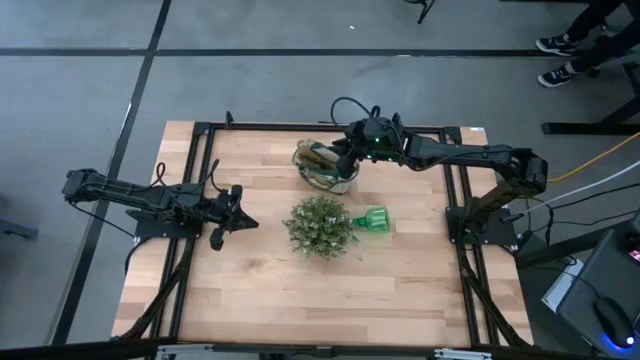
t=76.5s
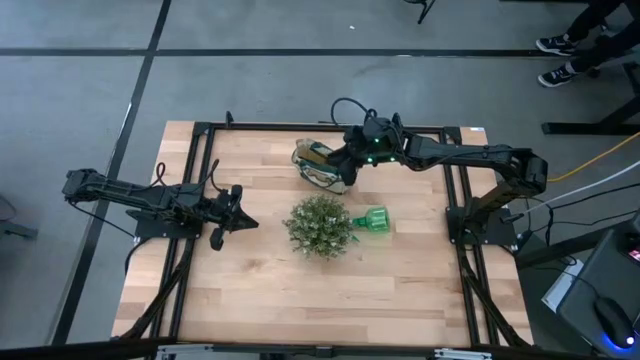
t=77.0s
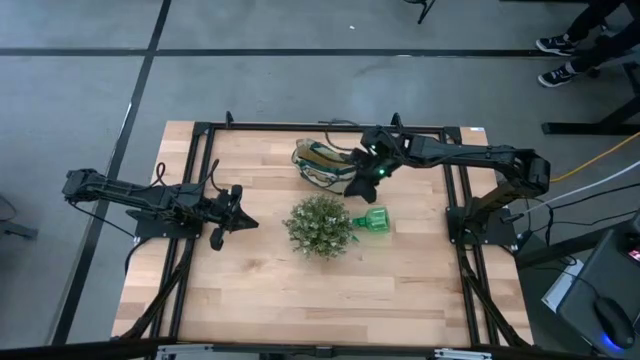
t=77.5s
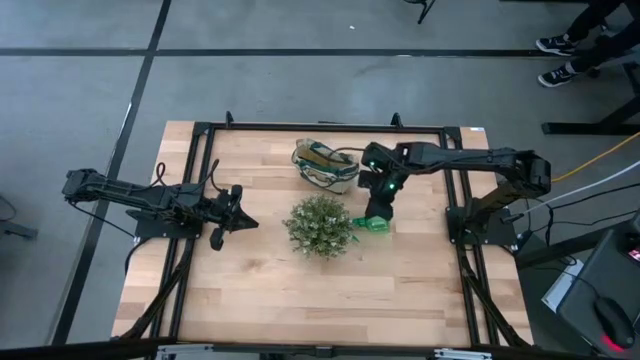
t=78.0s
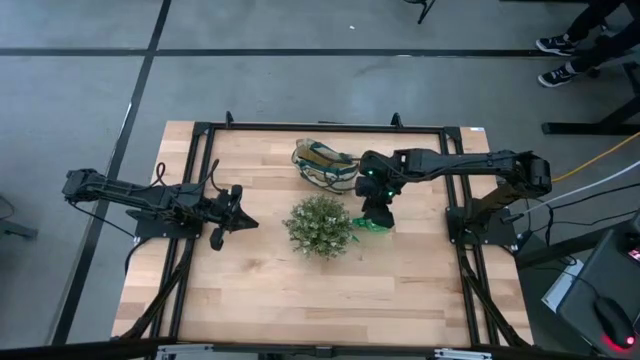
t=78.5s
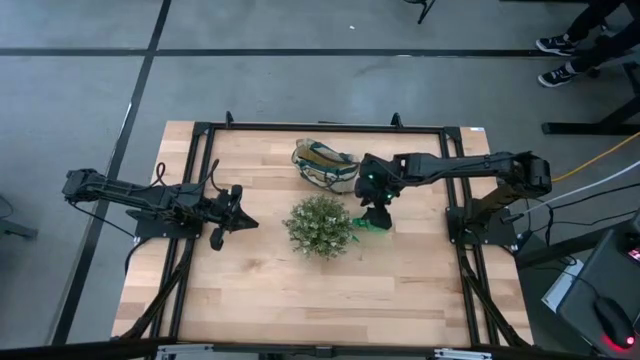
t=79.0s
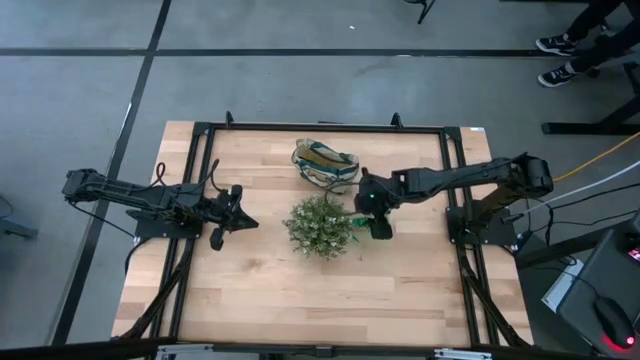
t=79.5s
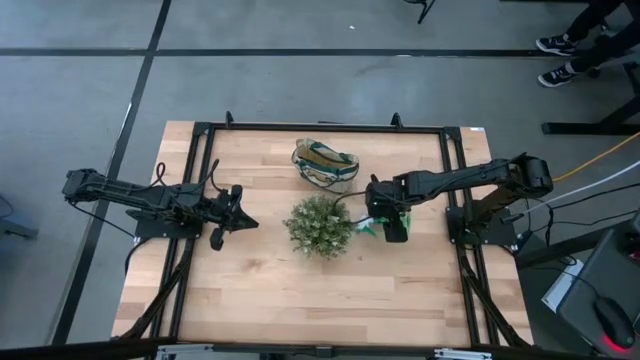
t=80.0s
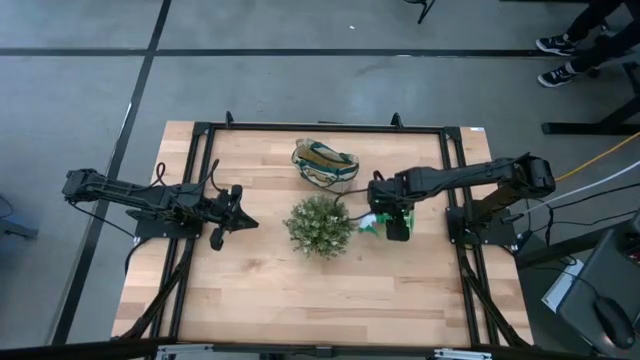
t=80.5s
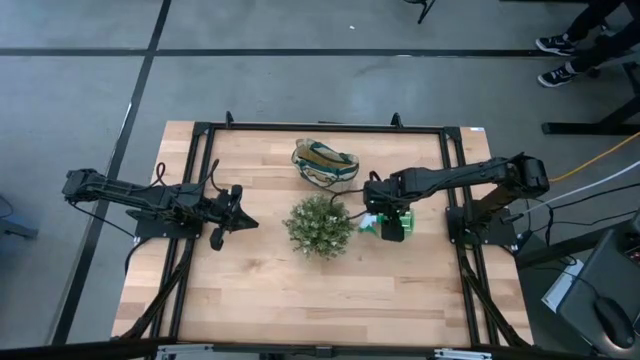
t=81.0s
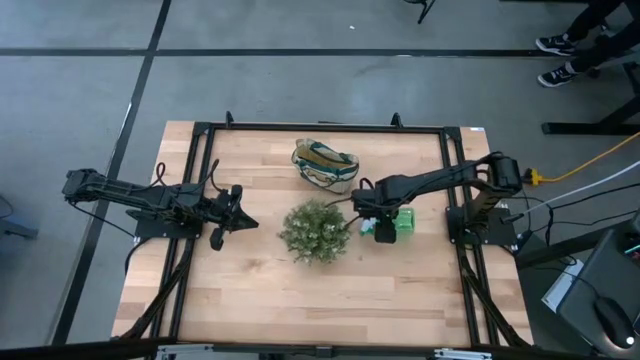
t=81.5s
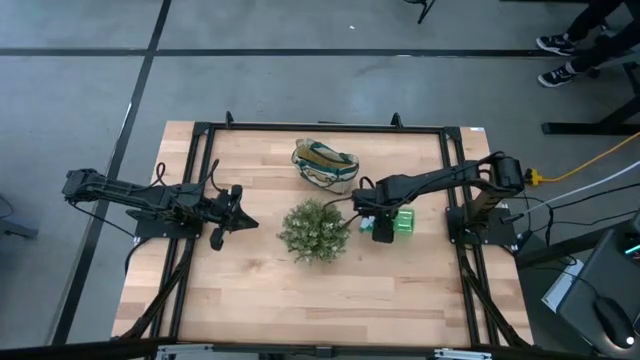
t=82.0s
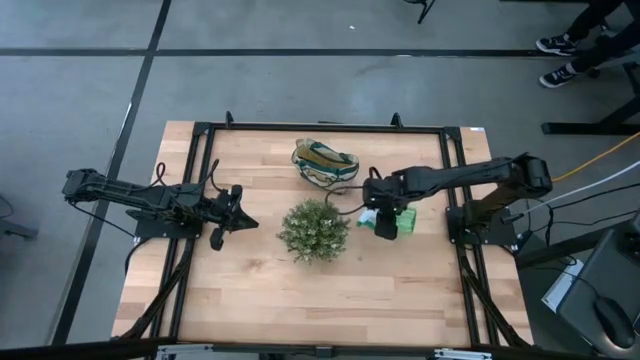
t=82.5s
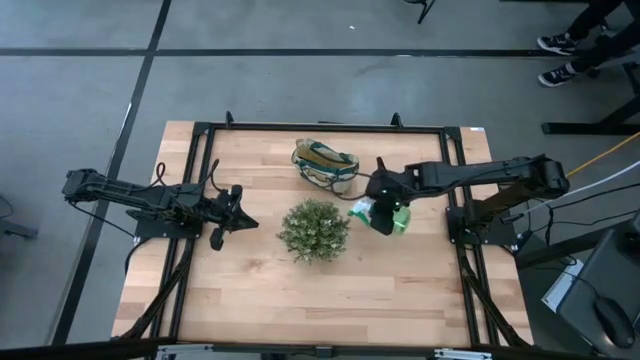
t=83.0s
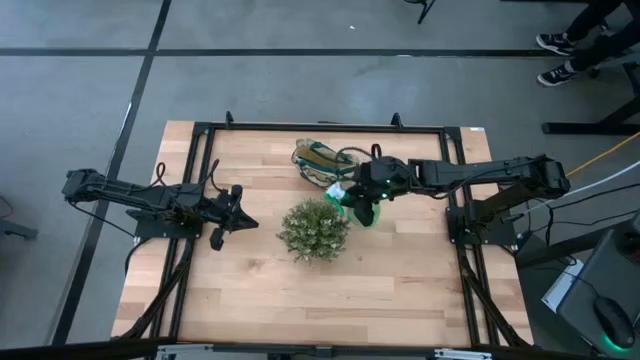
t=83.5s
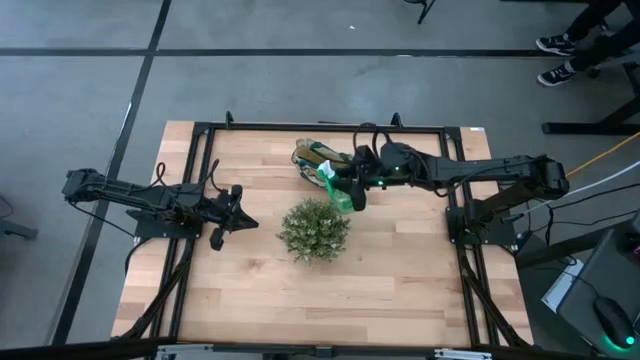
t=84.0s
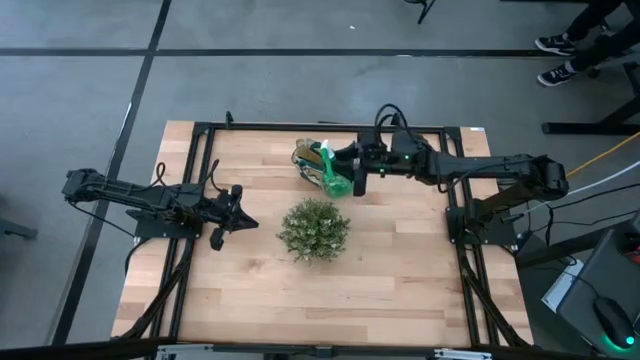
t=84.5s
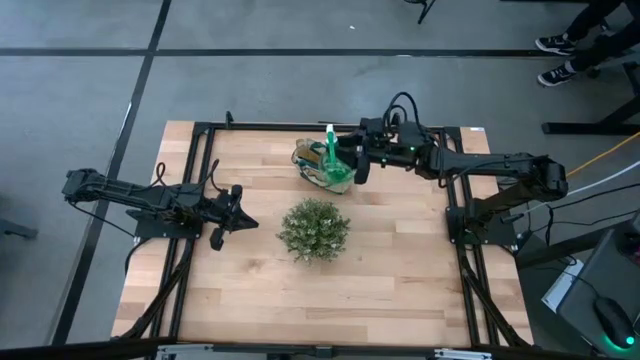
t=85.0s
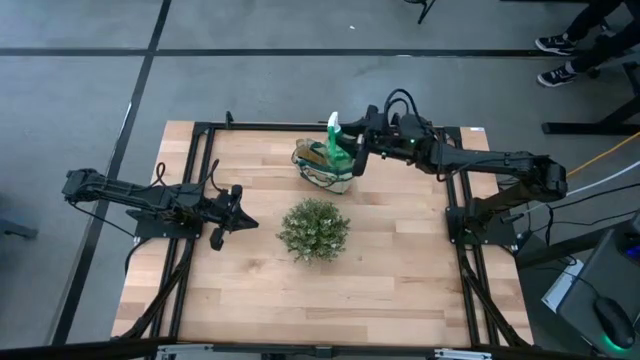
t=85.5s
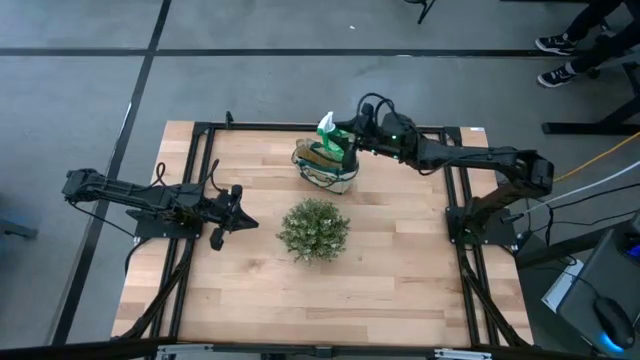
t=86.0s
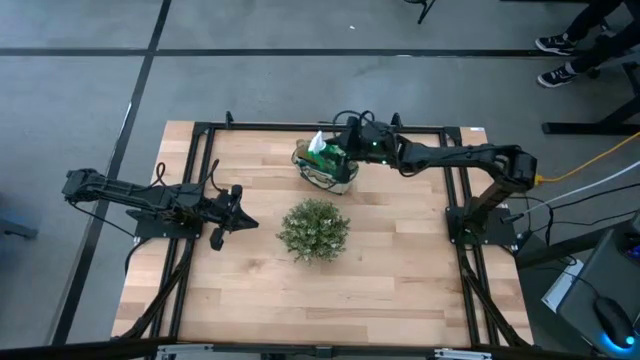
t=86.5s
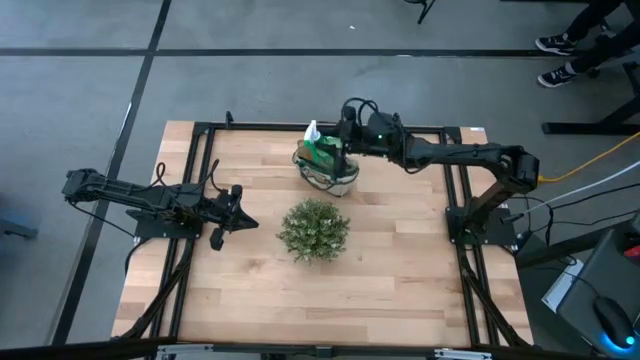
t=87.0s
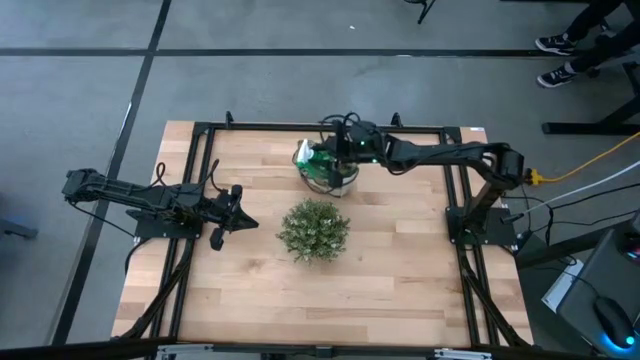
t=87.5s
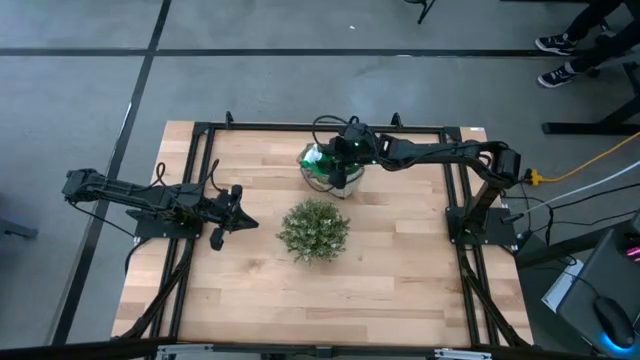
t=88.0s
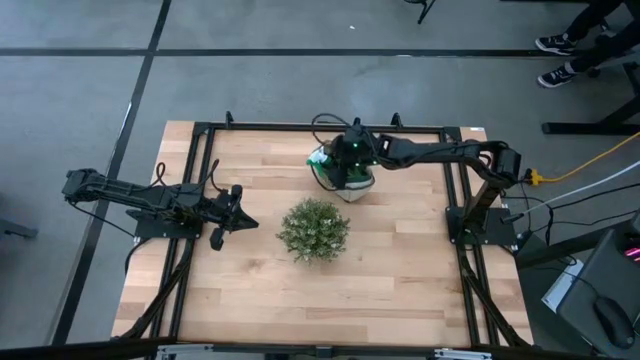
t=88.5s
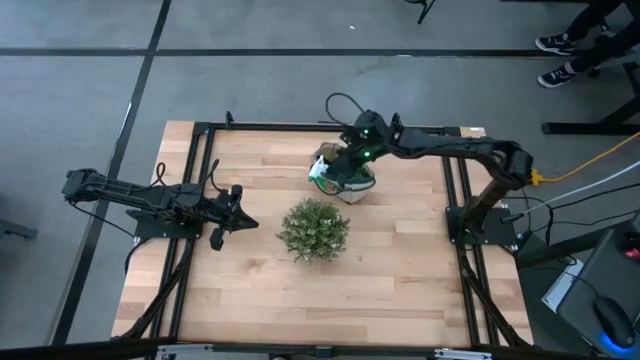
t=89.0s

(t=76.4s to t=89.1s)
Task: Pick & Place Garden tools in Gardening bag
Put the green spray bottle into the green gardening bag

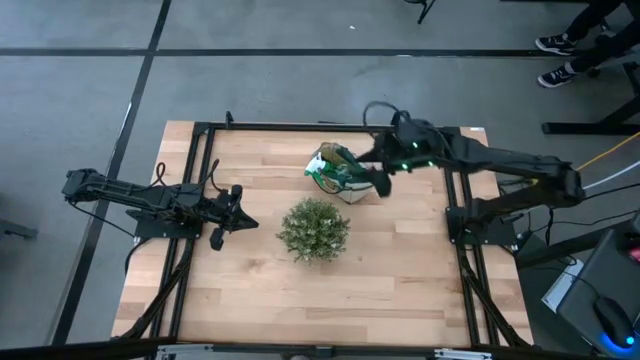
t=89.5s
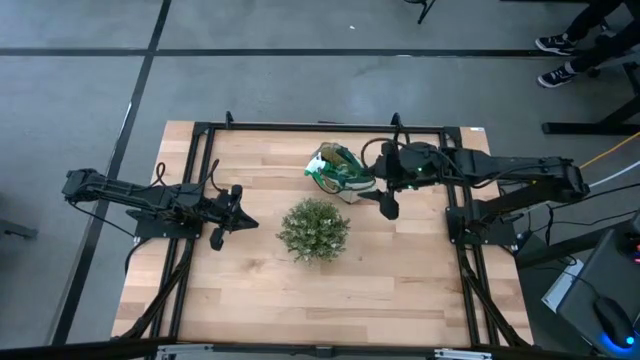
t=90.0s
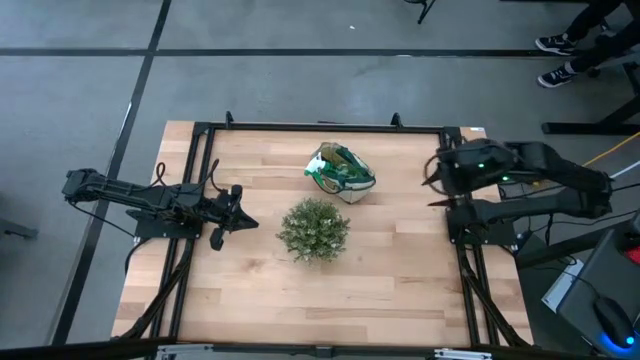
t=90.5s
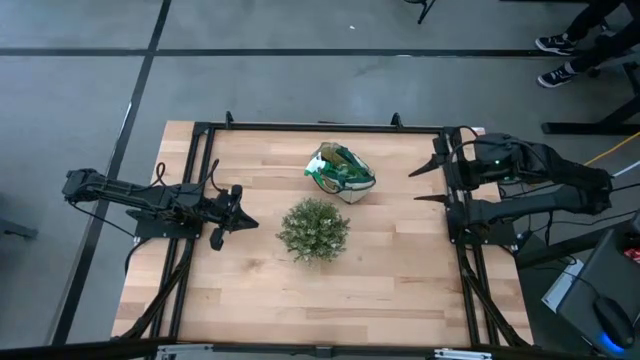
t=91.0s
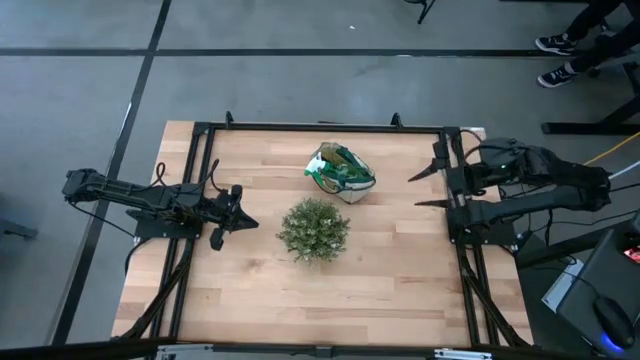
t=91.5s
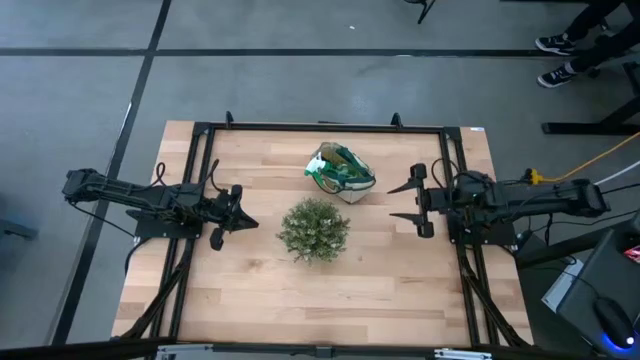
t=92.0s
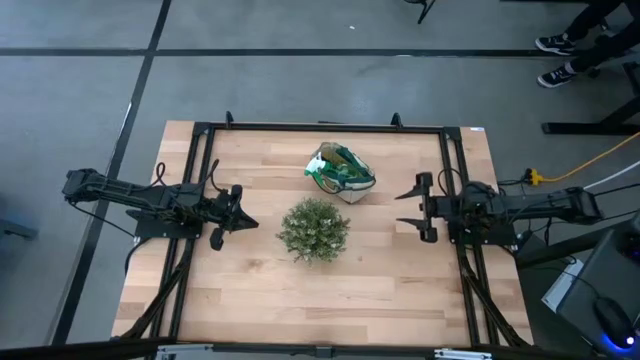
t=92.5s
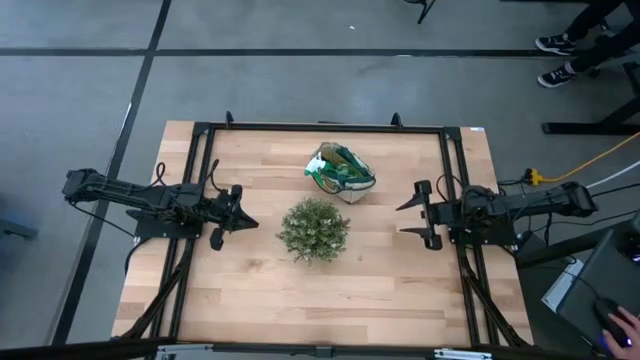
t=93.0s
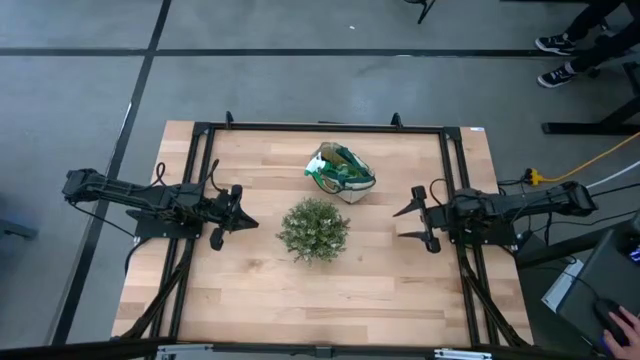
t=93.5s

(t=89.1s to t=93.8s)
Return to Home Position

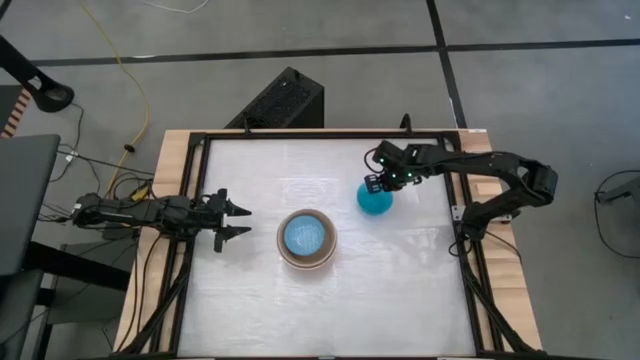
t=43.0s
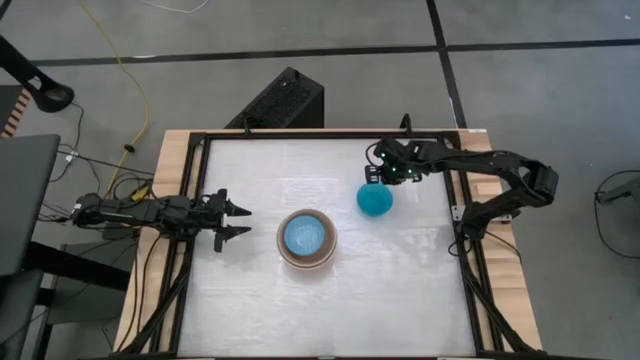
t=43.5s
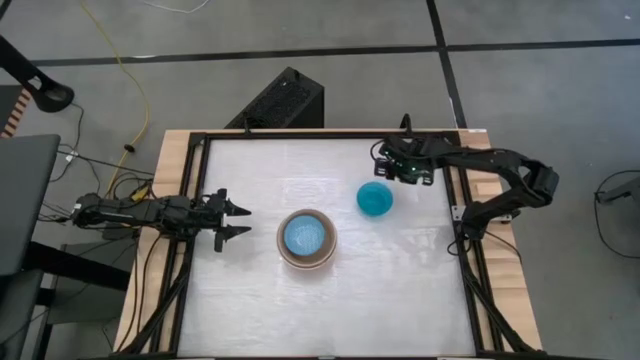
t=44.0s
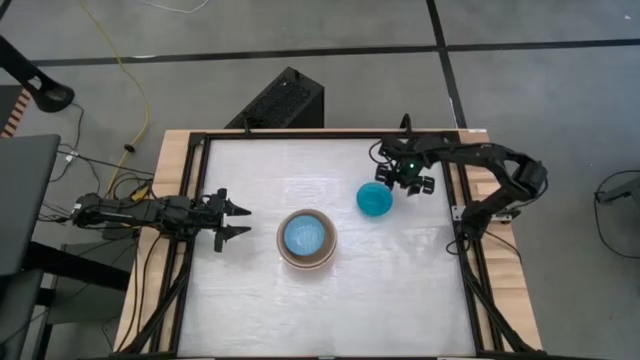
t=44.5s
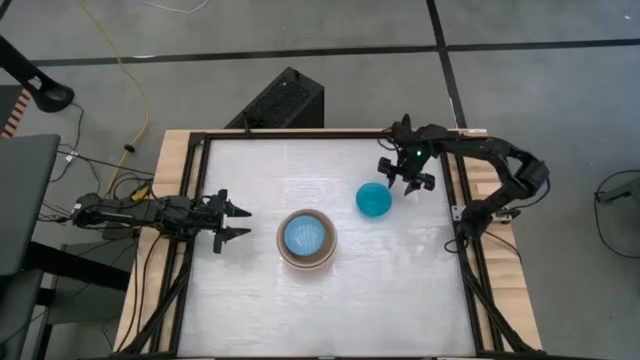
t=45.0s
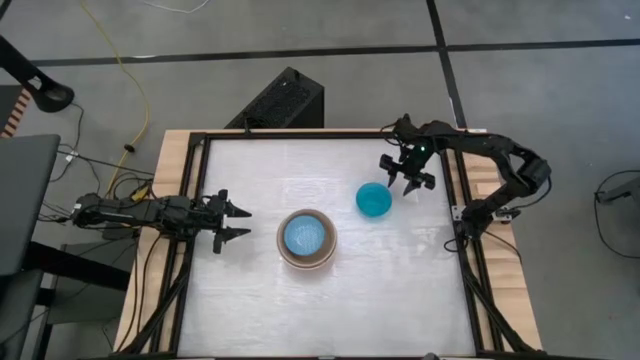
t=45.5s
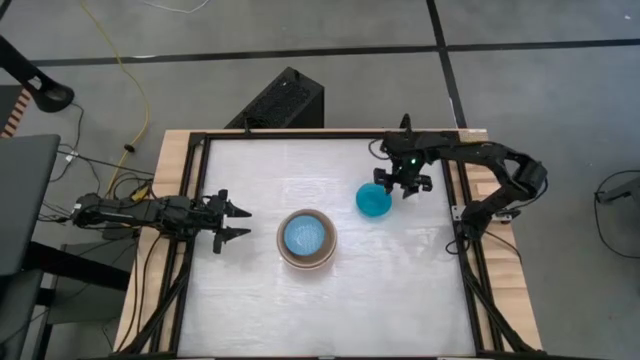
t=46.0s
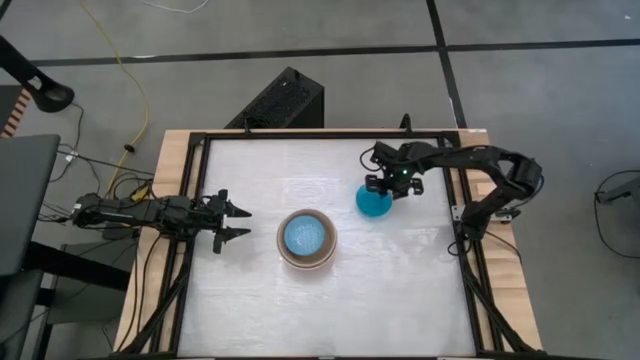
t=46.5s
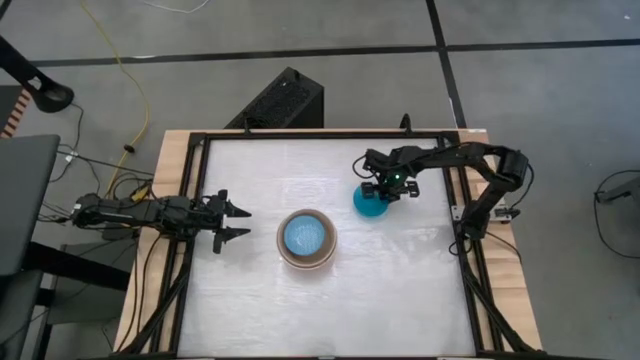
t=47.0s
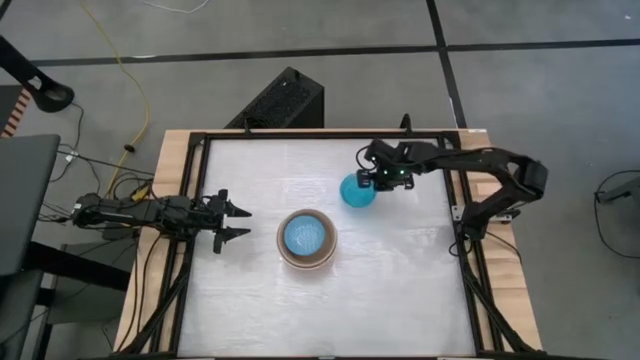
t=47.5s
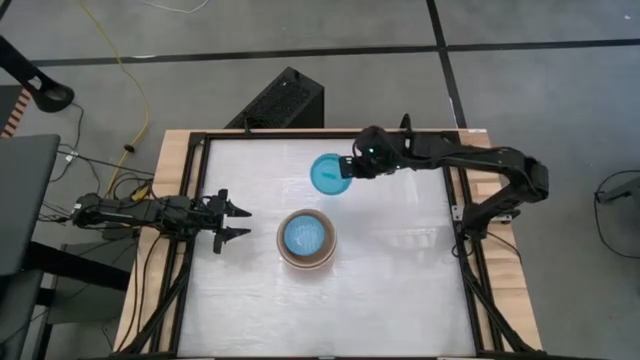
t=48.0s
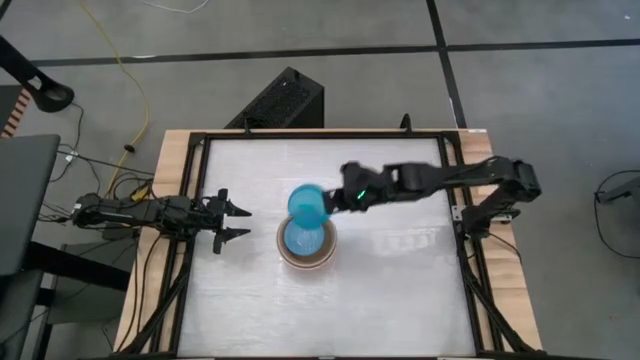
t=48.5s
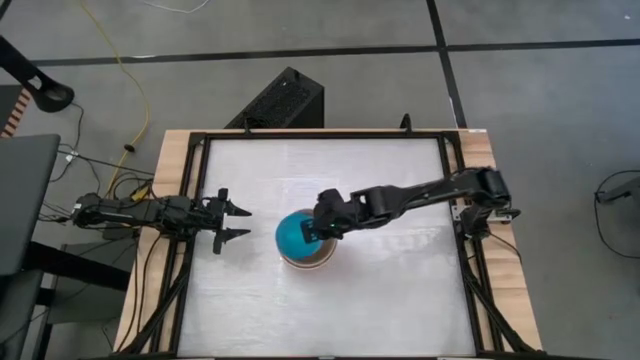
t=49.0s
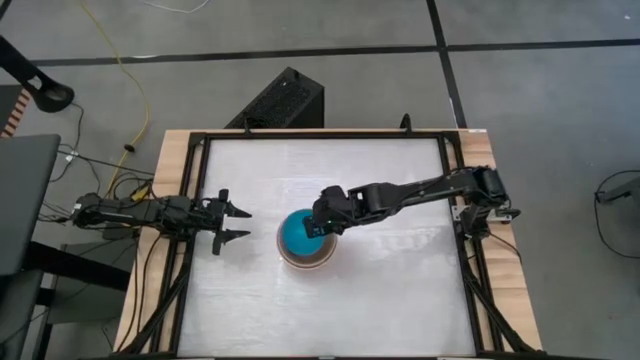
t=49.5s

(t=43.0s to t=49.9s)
Task: Nest bowls inside each other by size order
Stack the transparent blue bowl on top of the blue bowl
